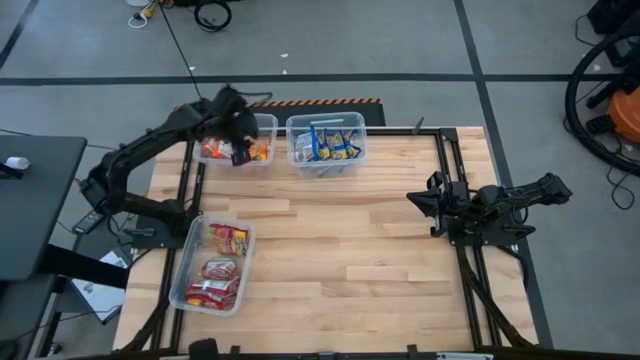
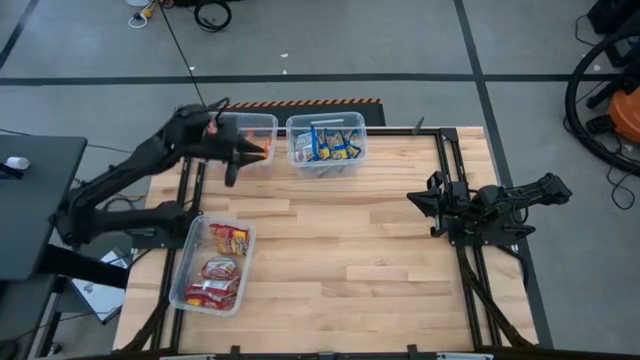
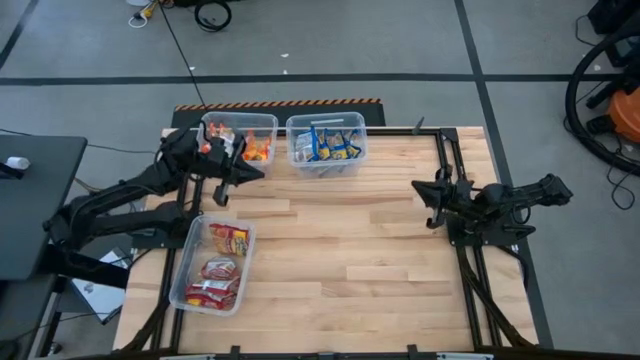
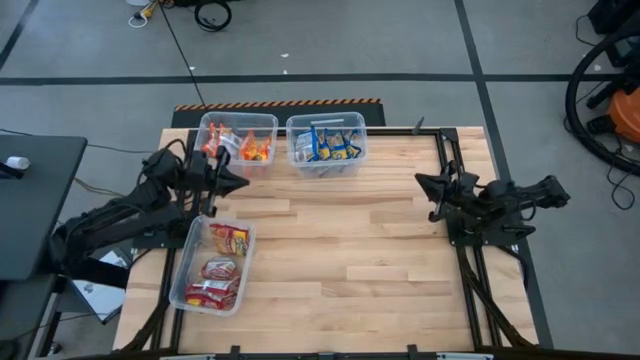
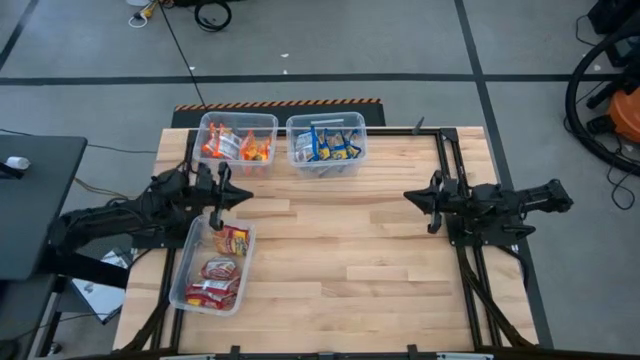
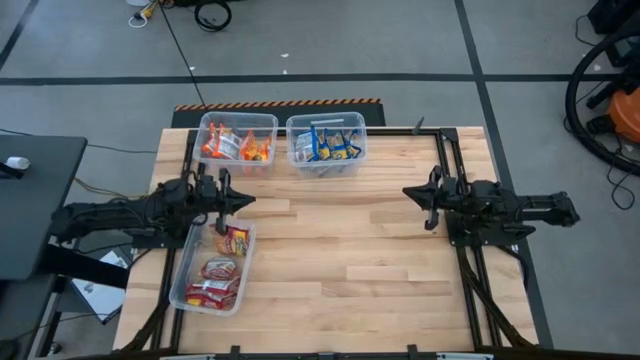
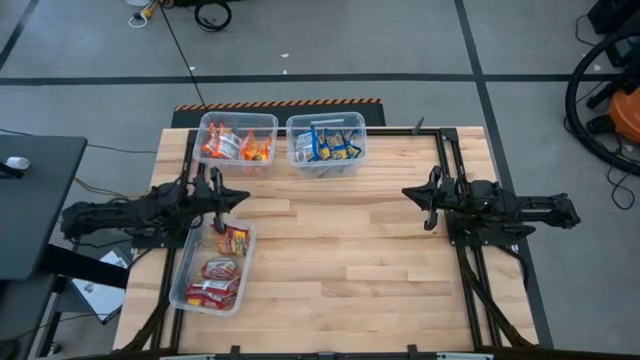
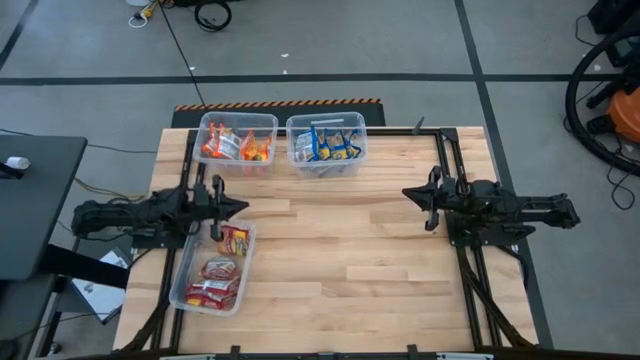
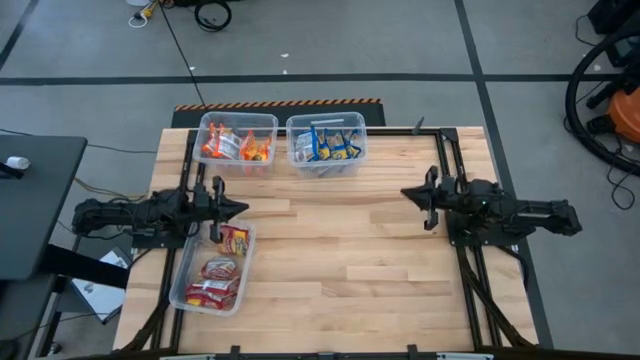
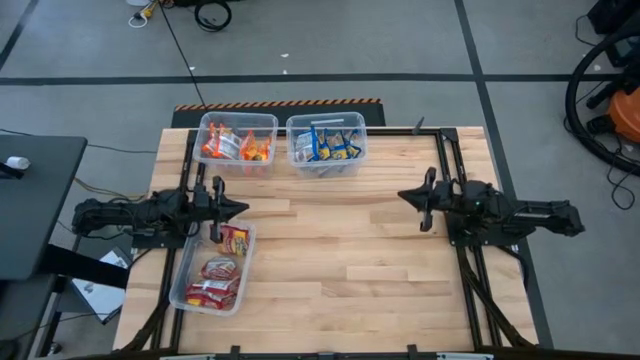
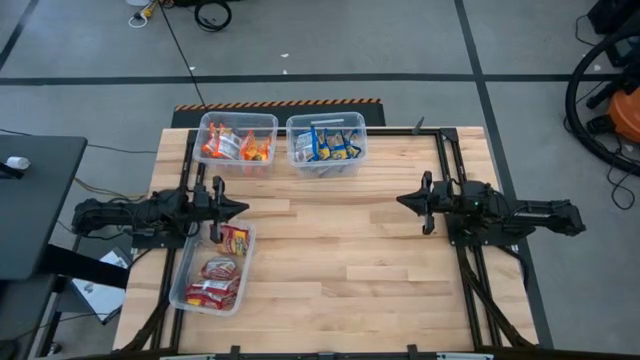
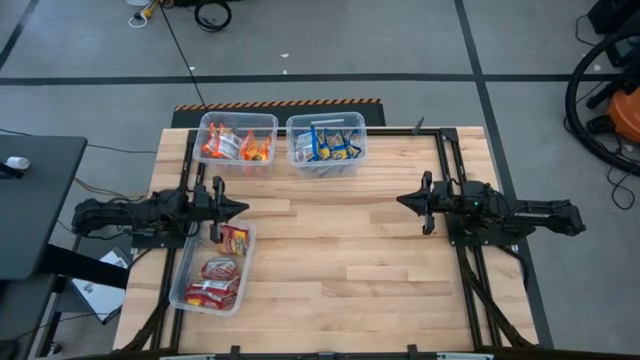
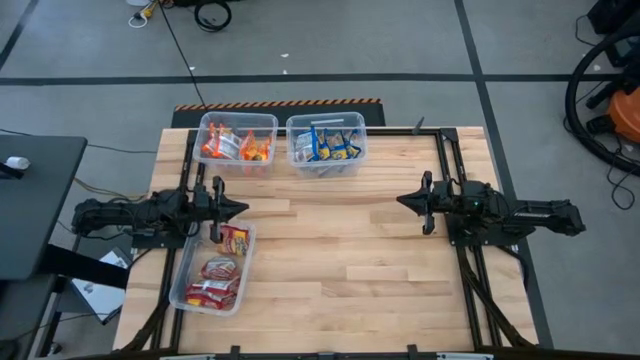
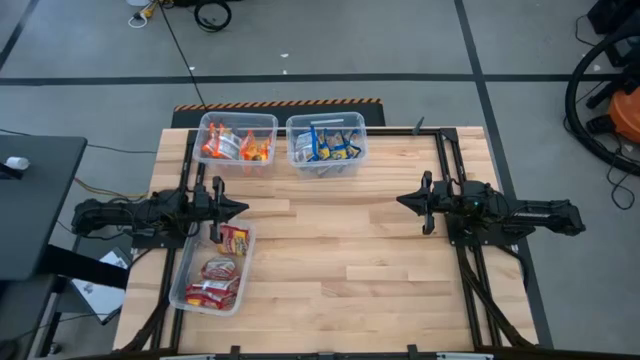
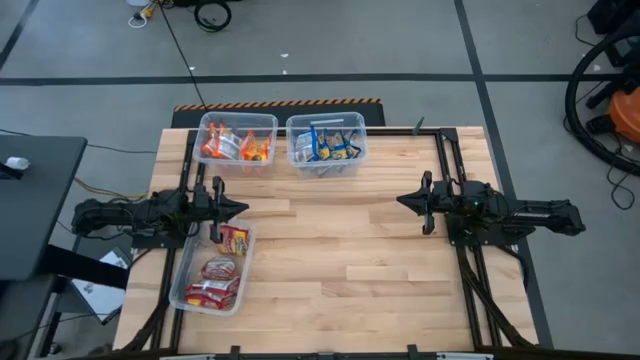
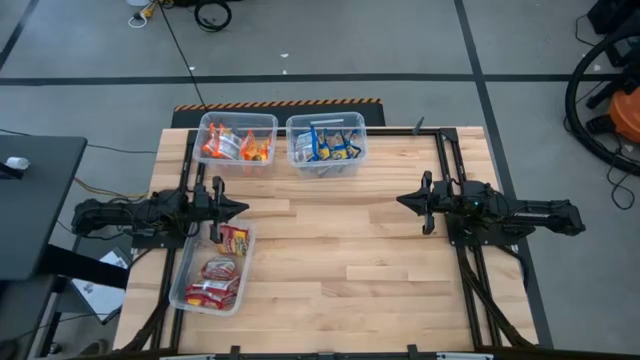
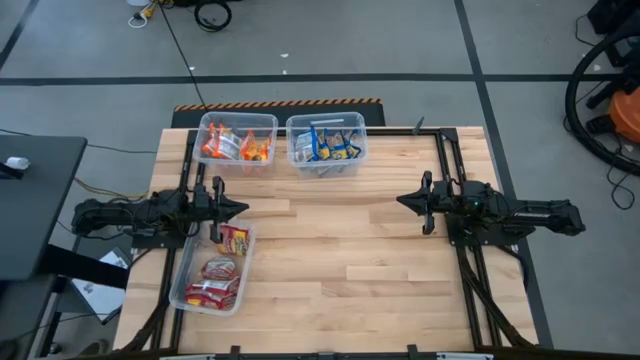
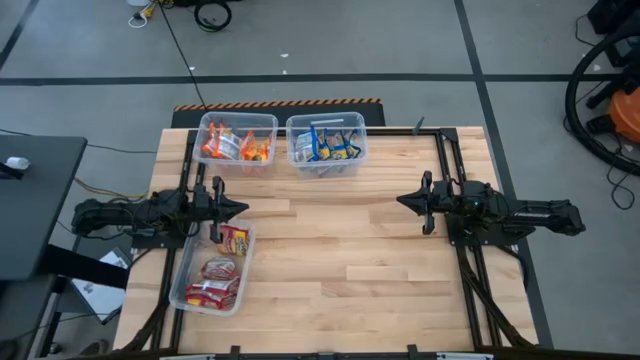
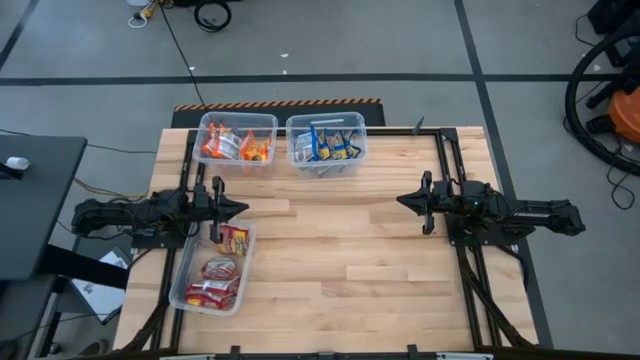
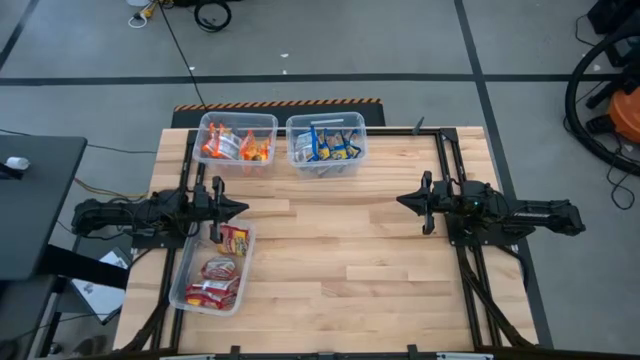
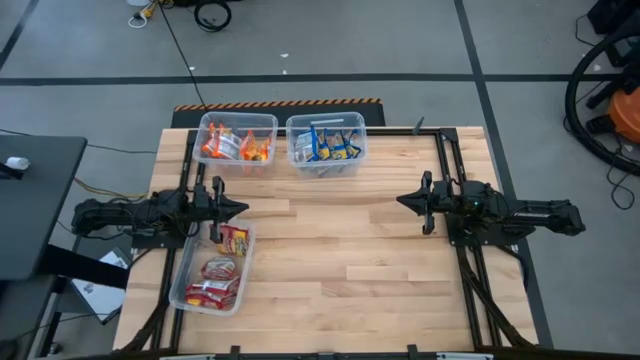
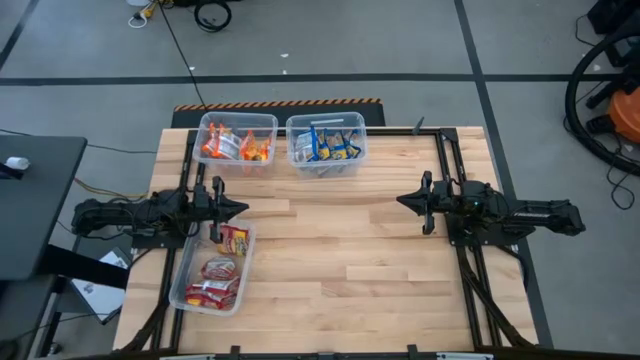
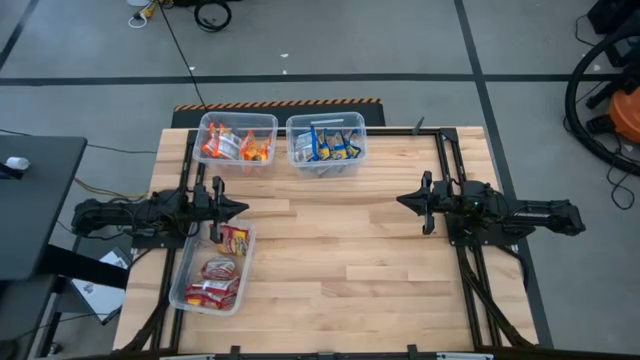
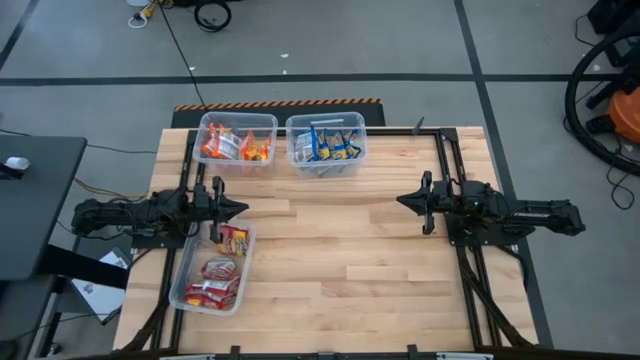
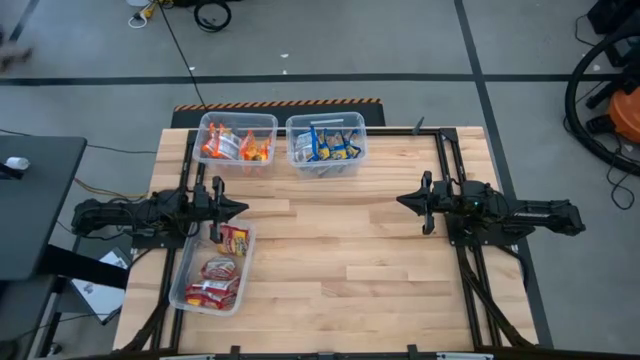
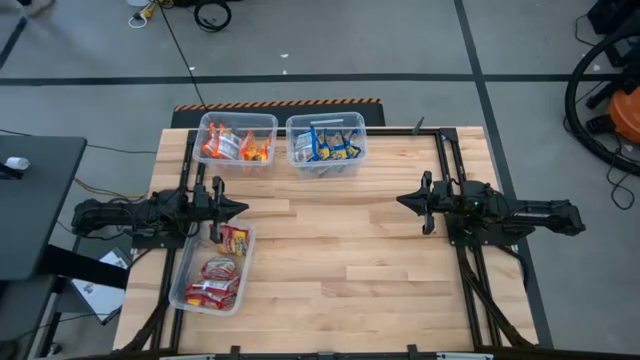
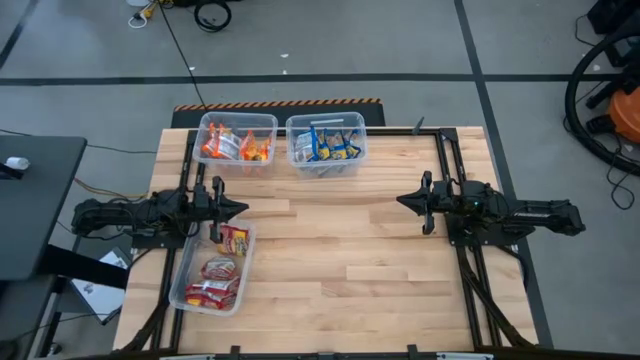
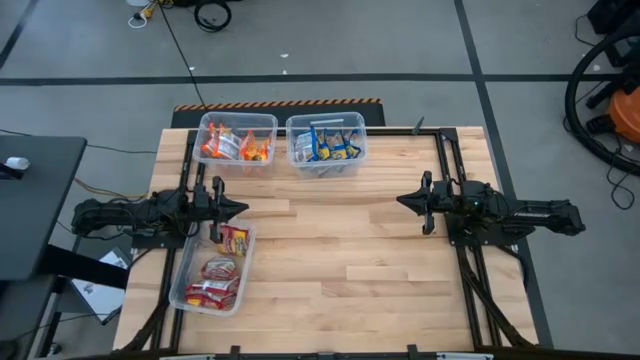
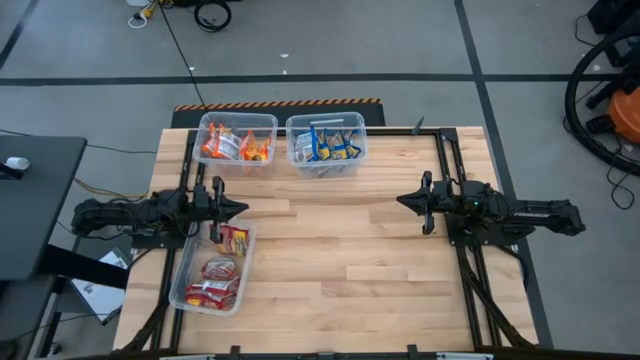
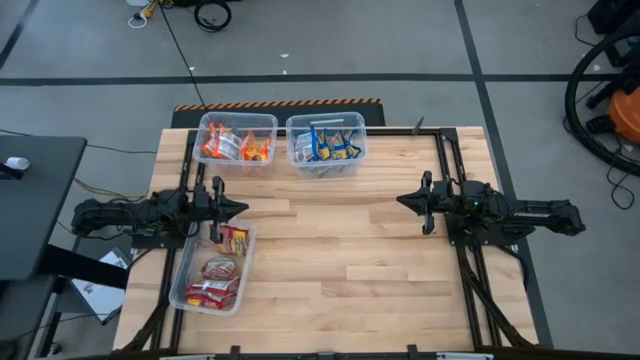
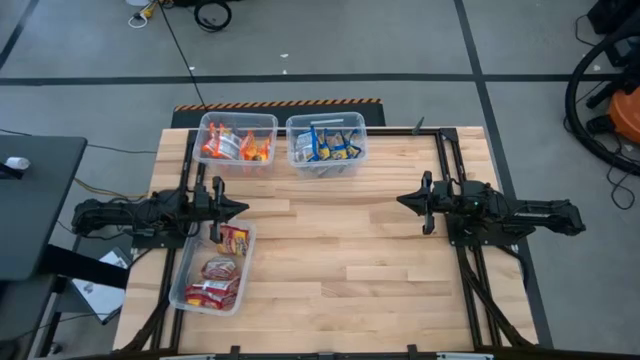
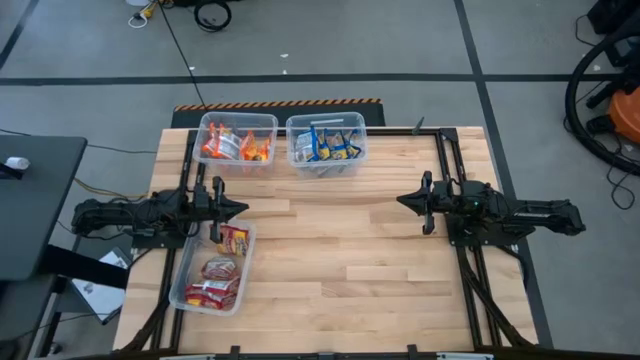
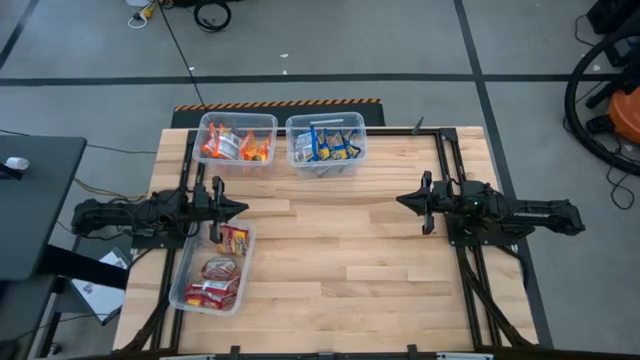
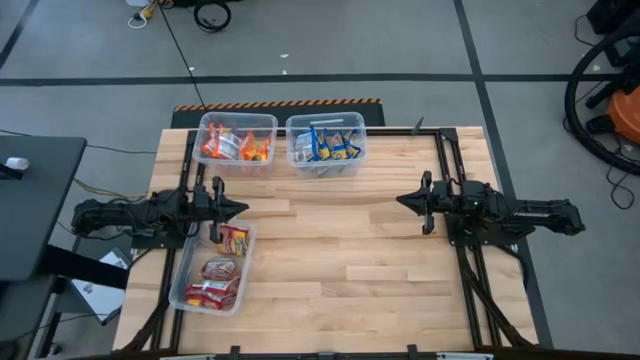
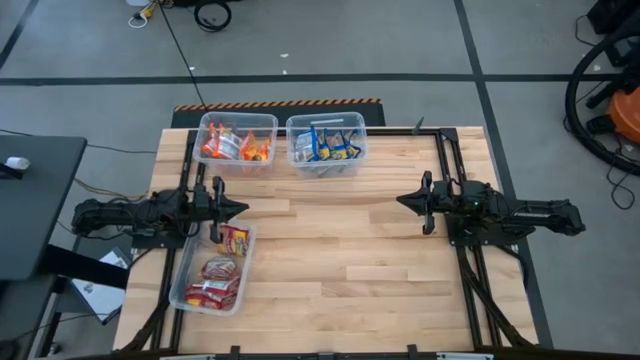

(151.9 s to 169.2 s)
Task: Sort Maruchan noodles
Return to Home Position

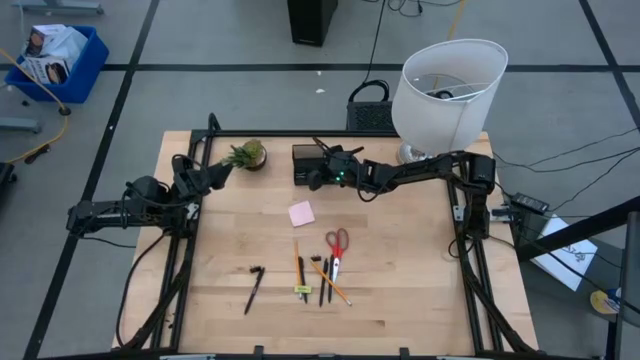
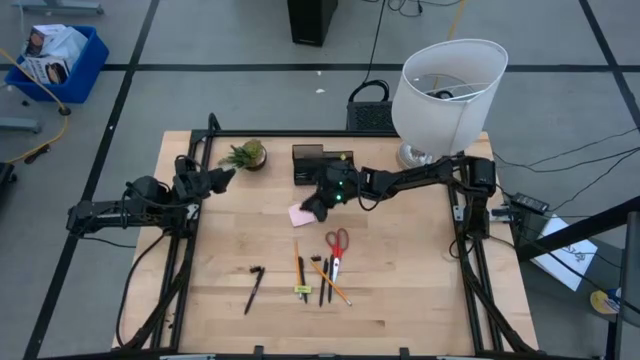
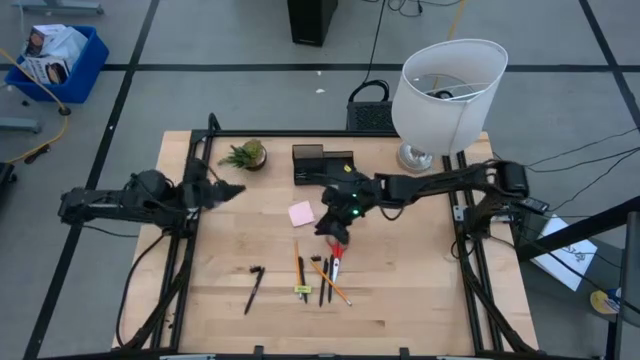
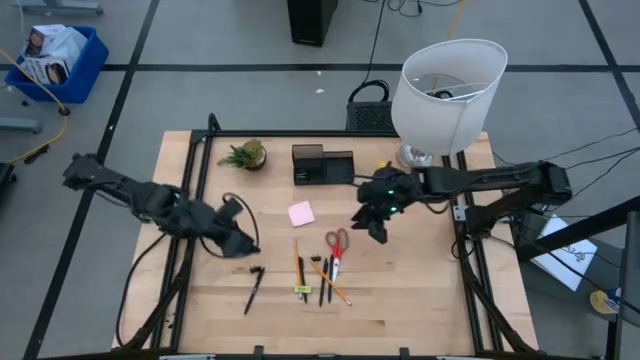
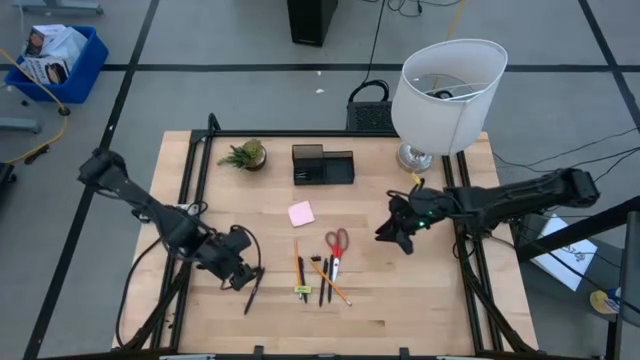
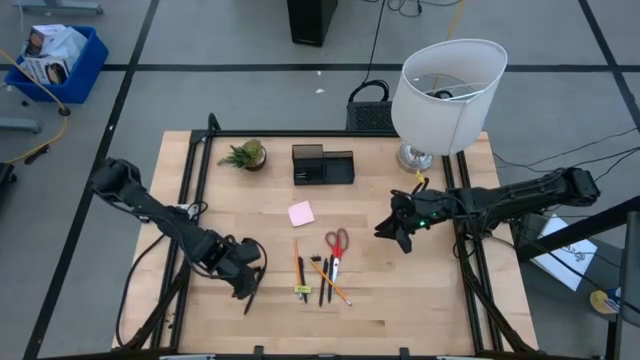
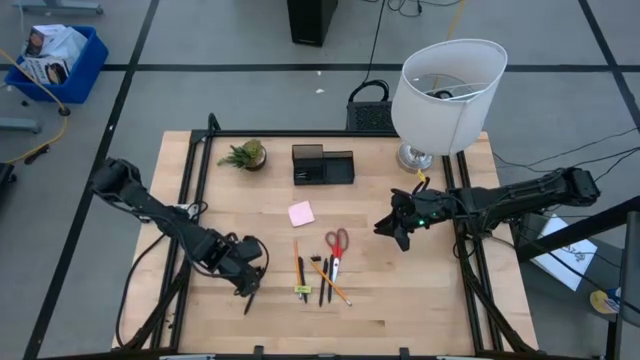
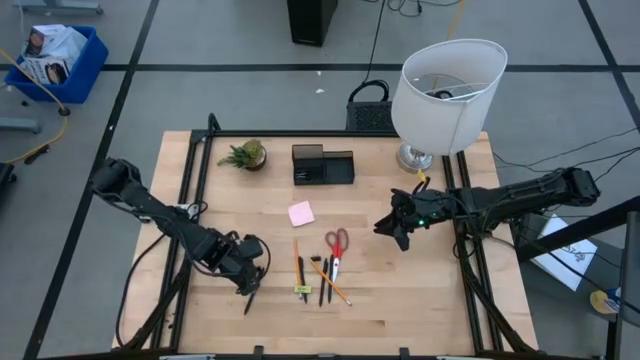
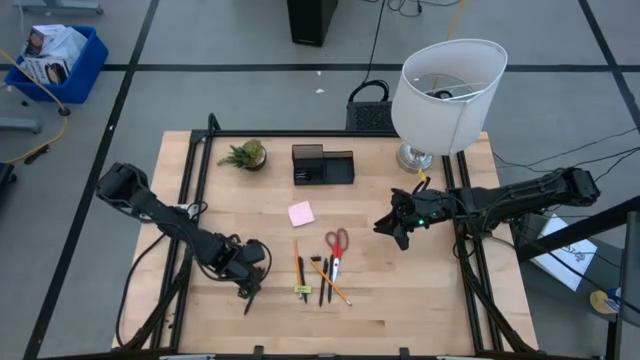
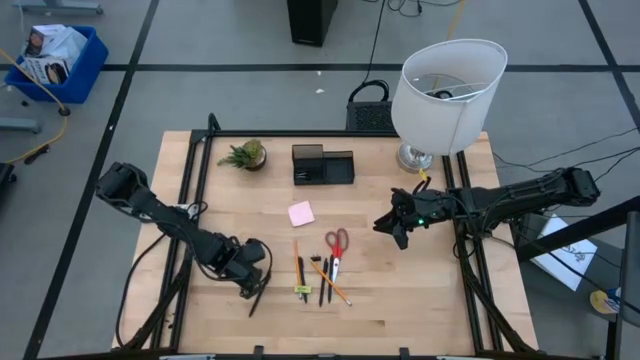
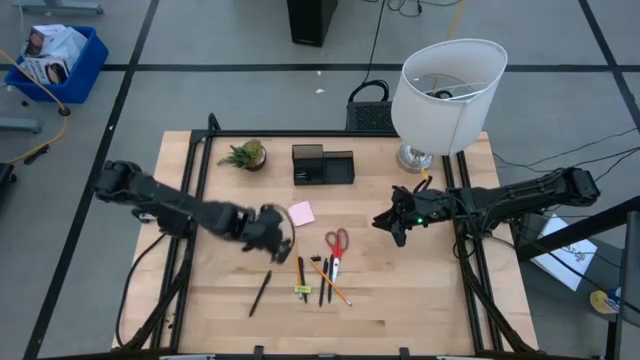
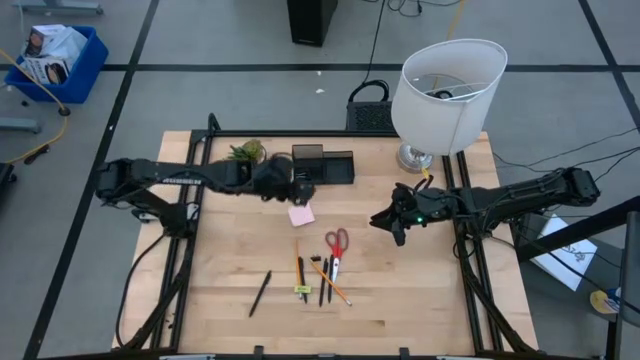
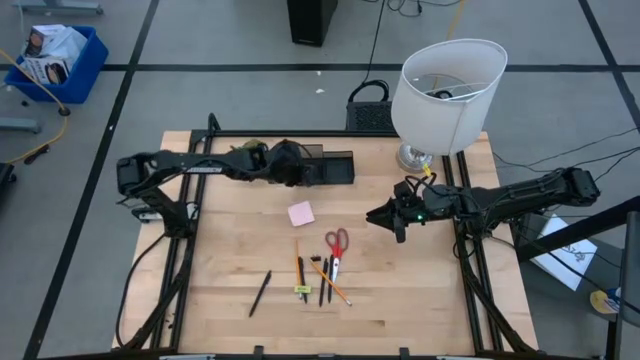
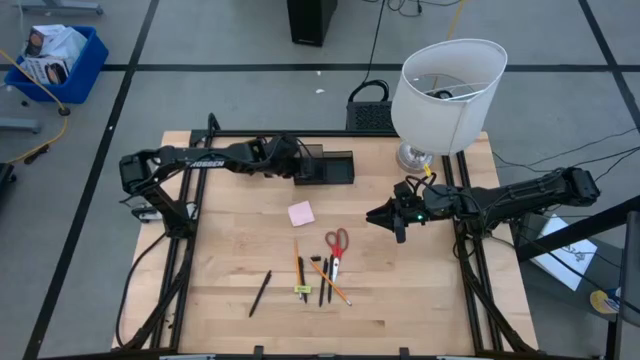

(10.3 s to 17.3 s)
Task: Pick and place office supplies into organizer
Put the black binder clip into the black desk organizer
